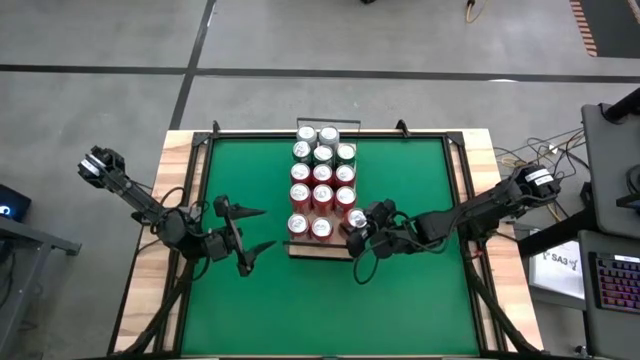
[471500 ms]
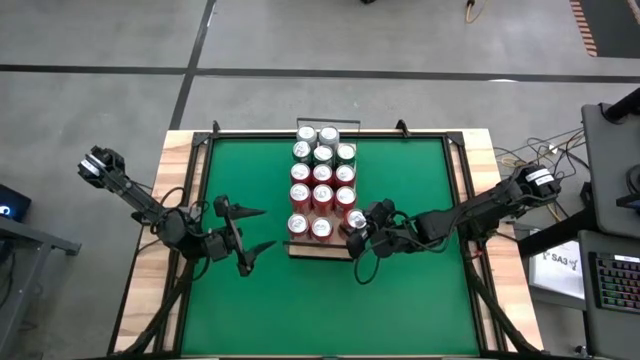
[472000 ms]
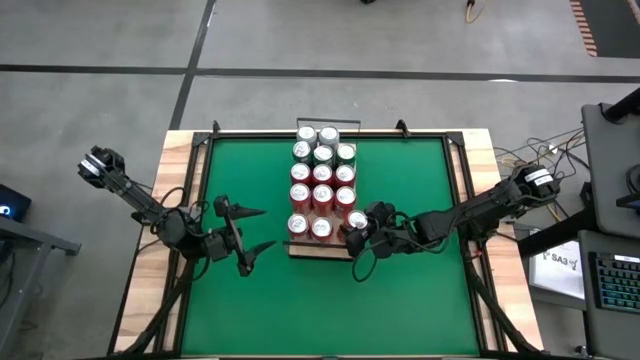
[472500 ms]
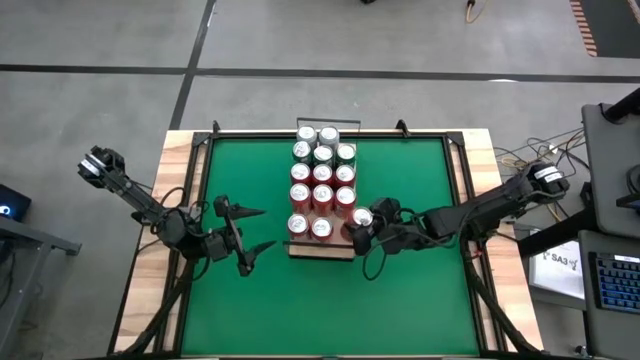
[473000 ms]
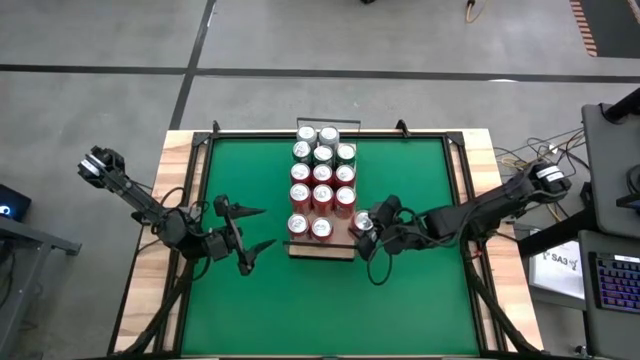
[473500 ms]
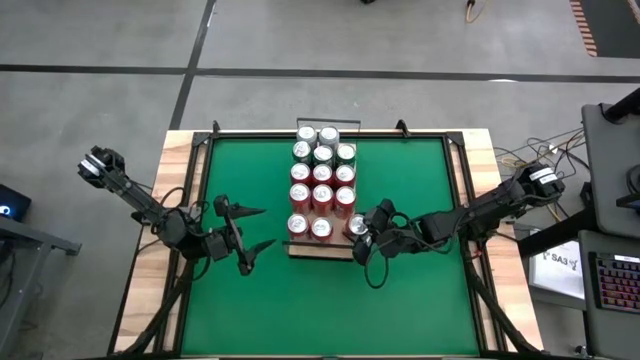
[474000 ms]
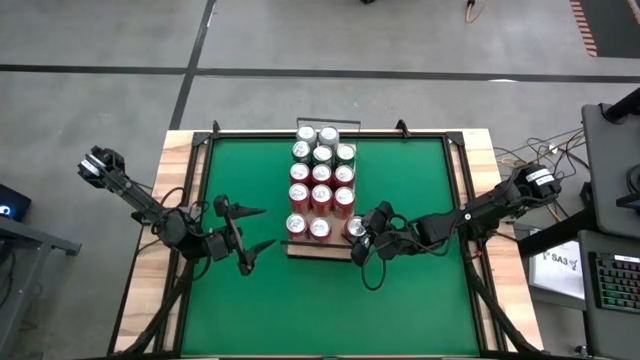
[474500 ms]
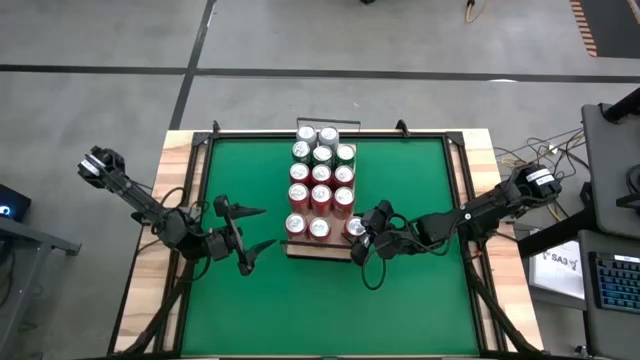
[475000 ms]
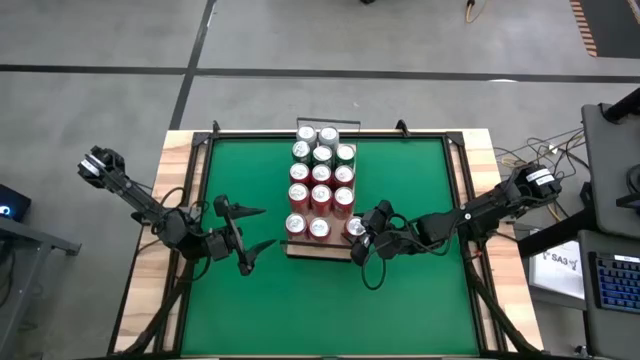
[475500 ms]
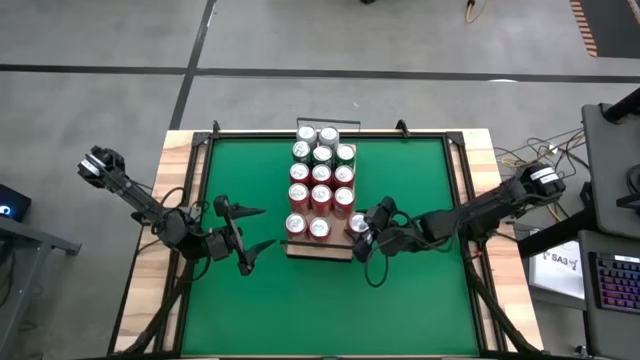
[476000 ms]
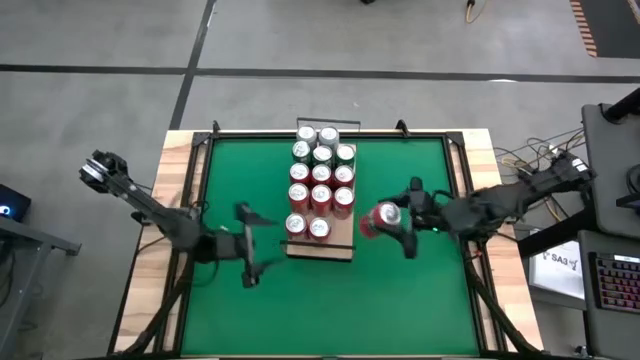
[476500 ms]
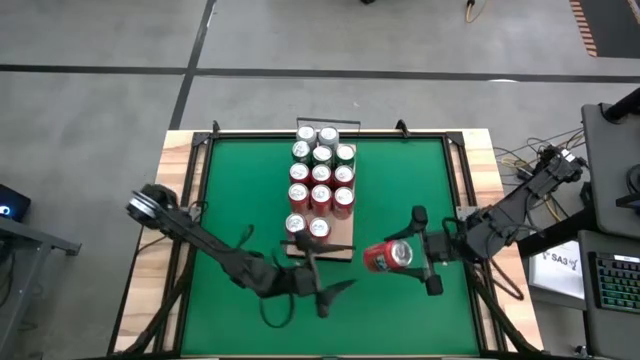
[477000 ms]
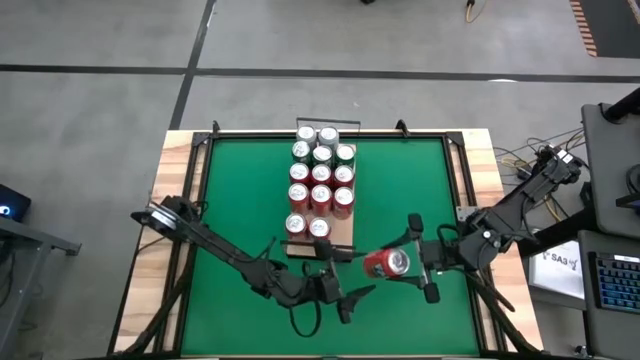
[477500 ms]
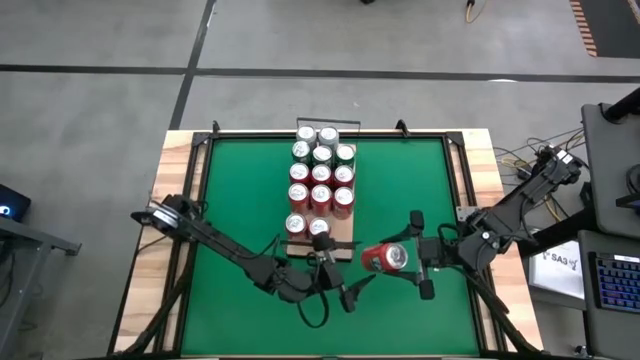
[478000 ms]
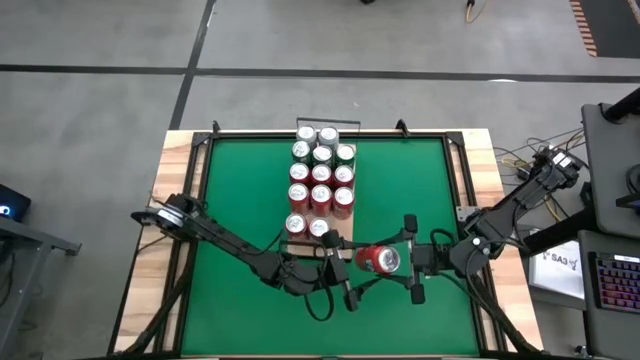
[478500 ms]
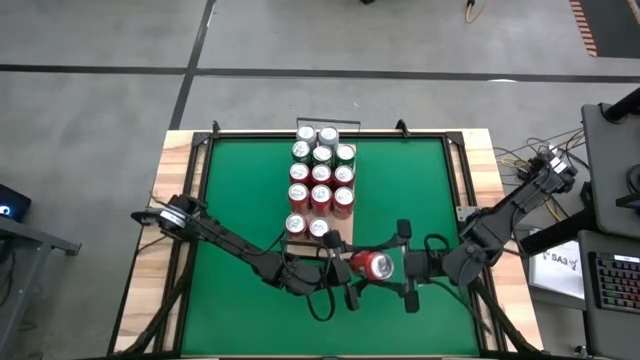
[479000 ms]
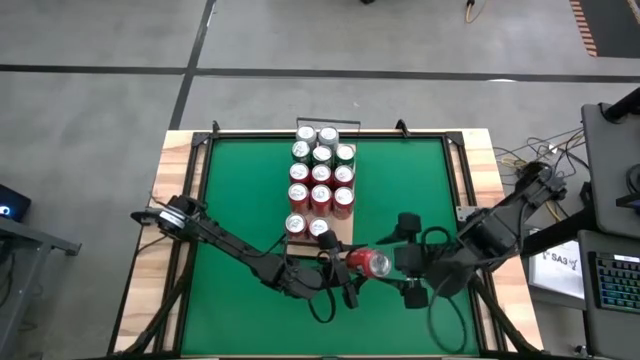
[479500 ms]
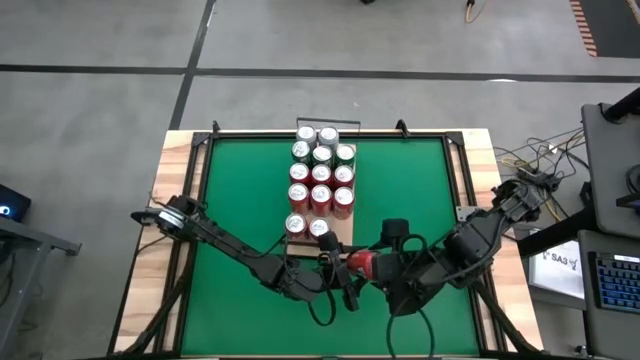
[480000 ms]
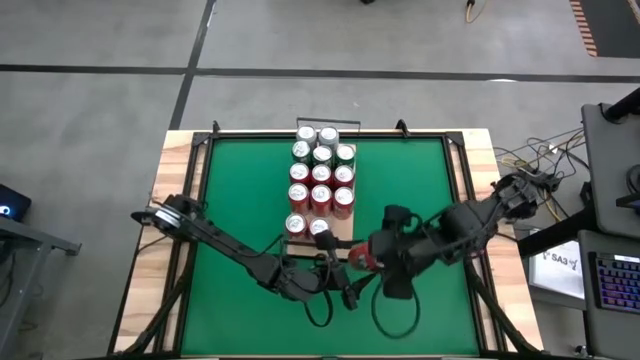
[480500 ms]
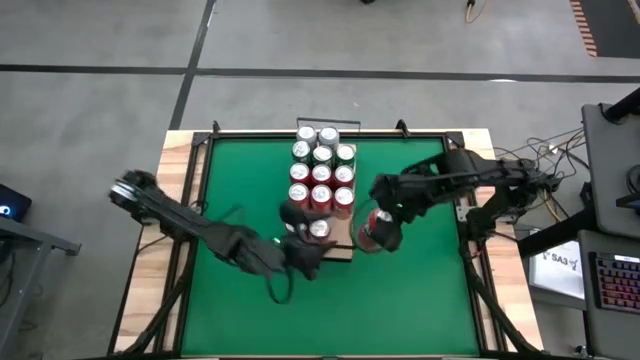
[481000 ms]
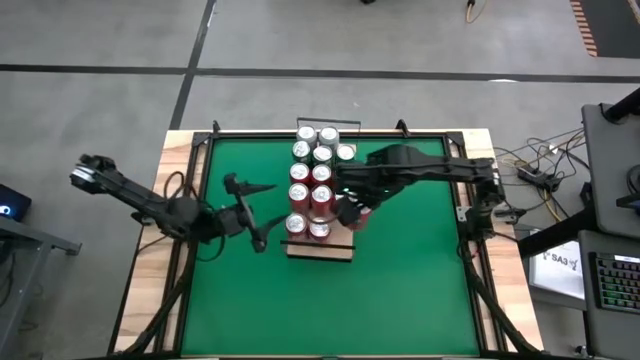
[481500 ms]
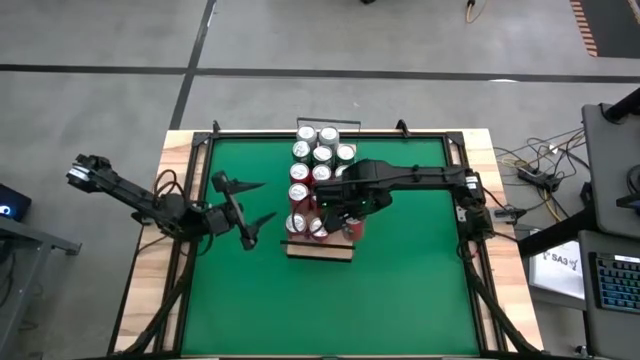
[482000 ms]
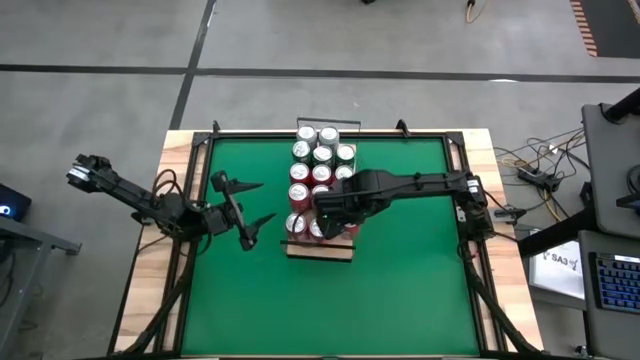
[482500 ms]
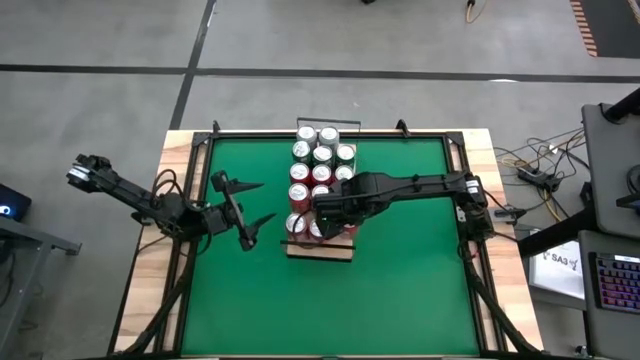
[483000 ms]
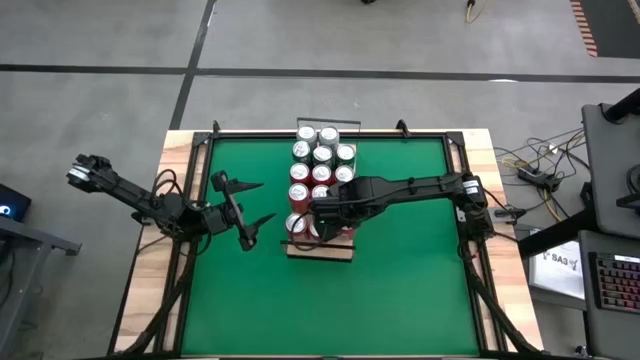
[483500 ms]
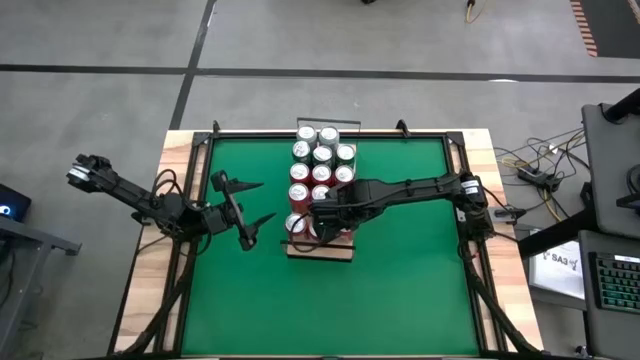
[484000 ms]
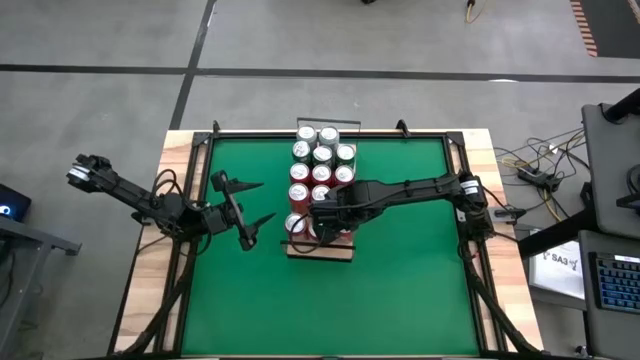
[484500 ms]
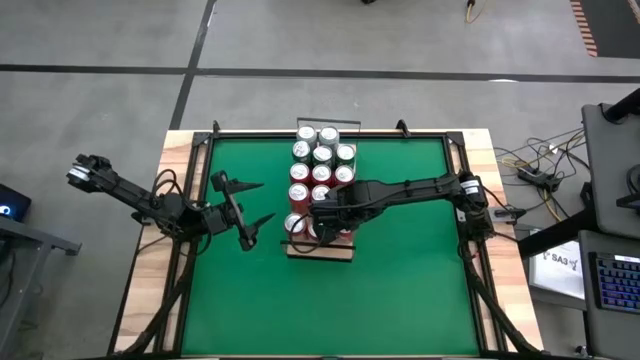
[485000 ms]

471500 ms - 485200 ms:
Task: Place canned beverage on shelf
Put the orange soda can on the shelf and aligned with the other orange soda can

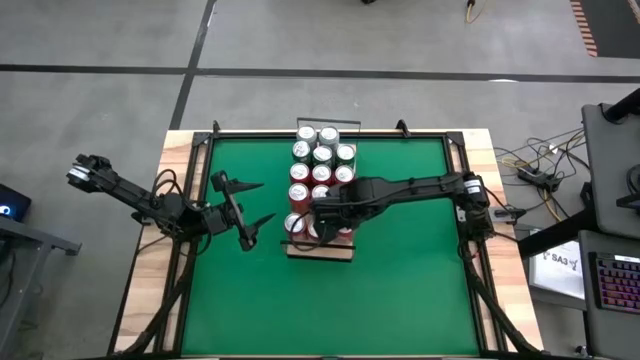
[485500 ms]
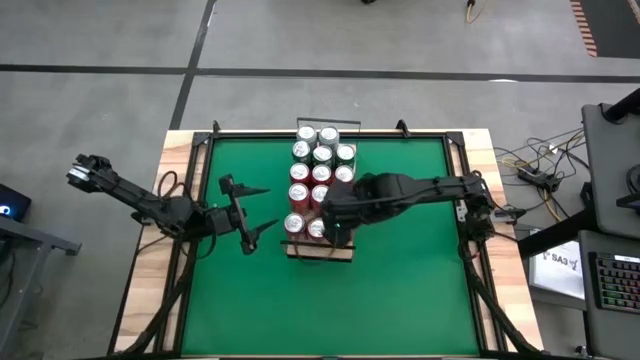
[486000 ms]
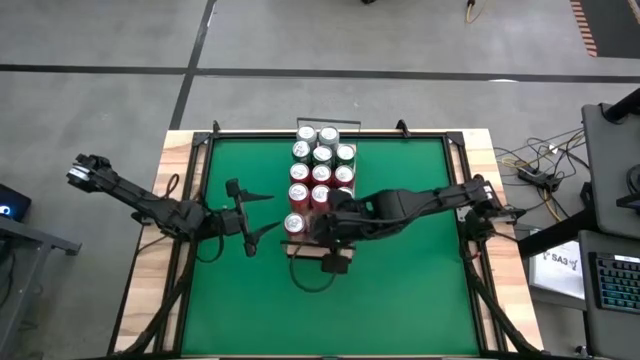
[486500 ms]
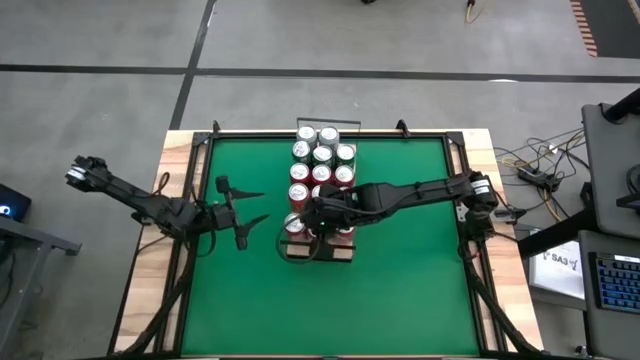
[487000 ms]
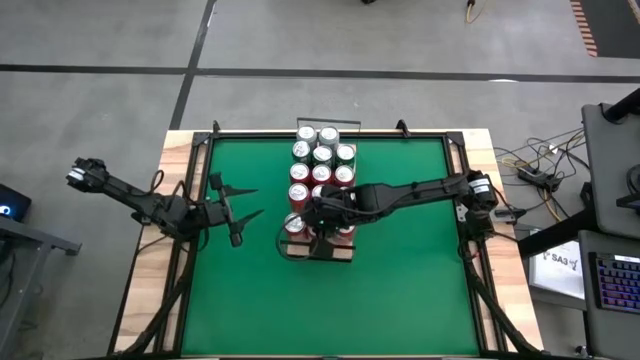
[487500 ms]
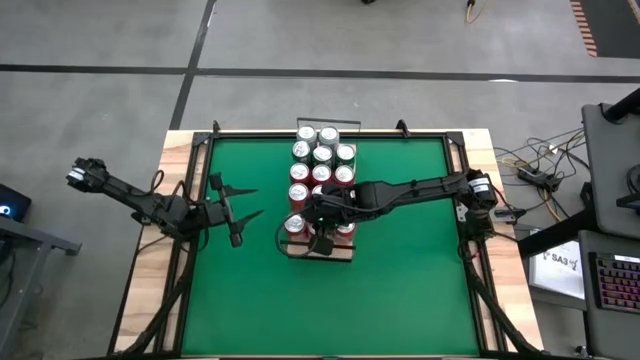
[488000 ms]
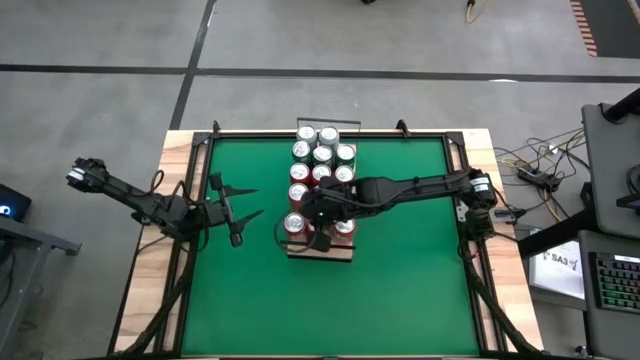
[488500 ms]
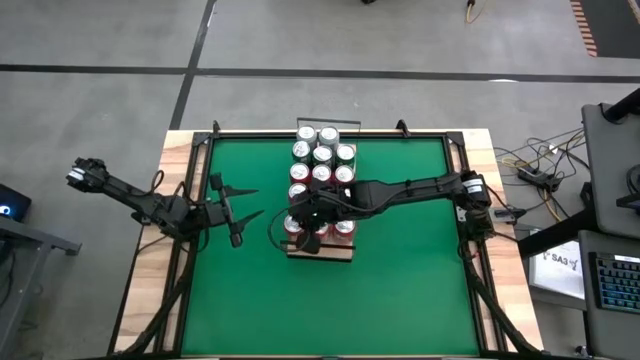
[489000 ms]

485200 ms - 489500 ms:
Adjust the orange soda cans

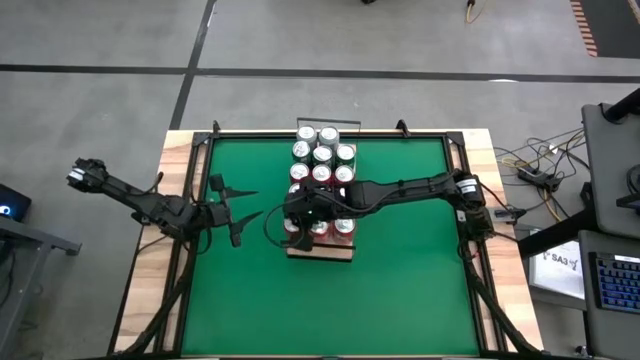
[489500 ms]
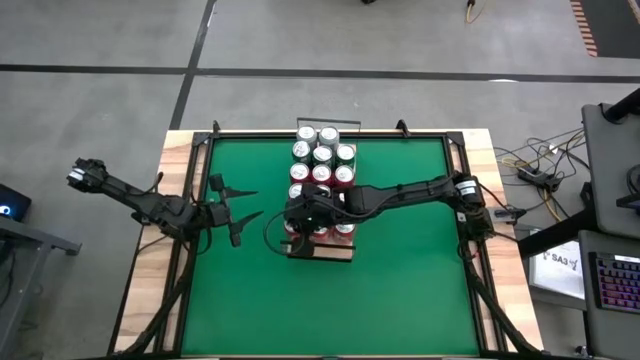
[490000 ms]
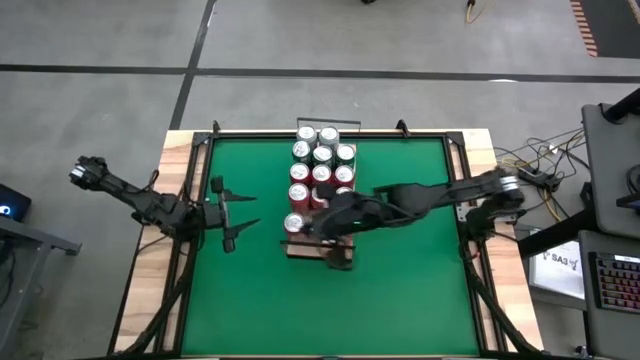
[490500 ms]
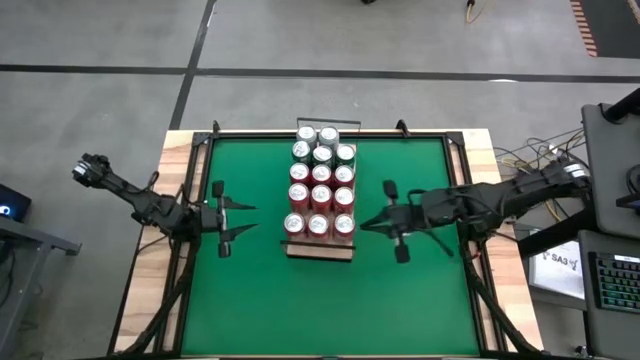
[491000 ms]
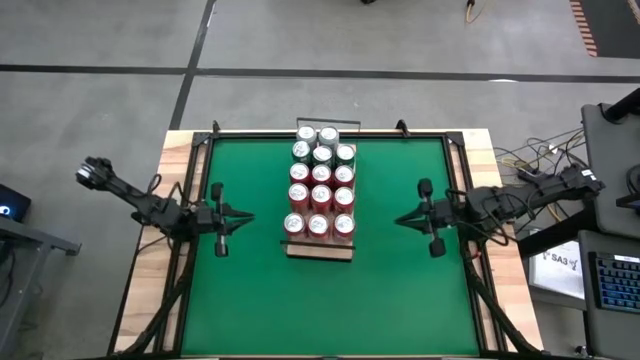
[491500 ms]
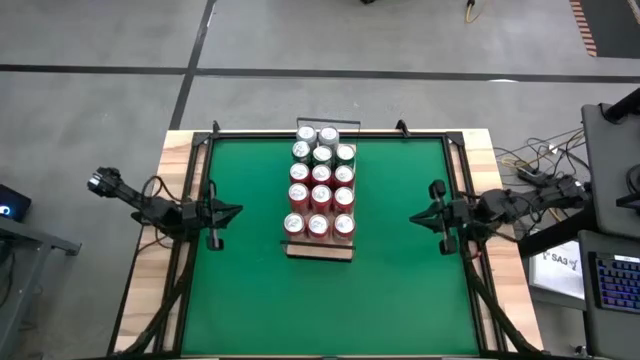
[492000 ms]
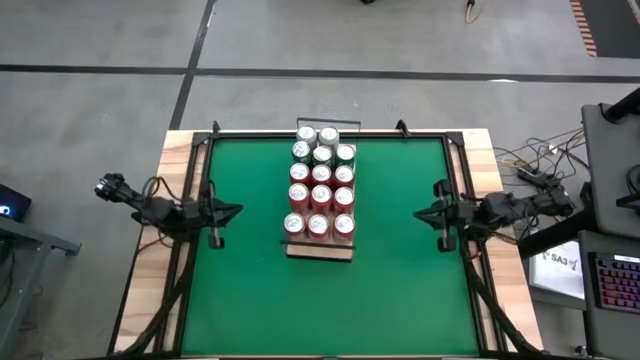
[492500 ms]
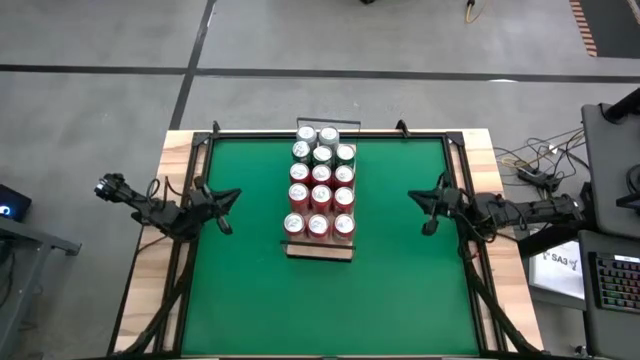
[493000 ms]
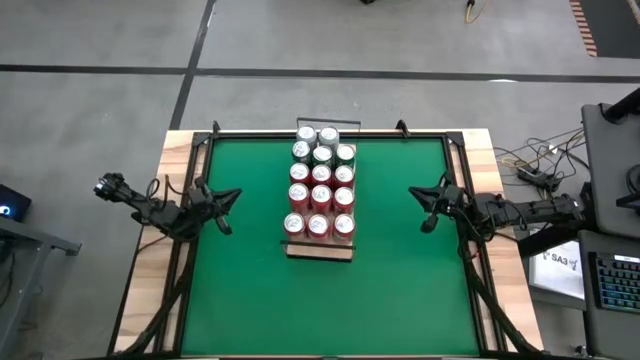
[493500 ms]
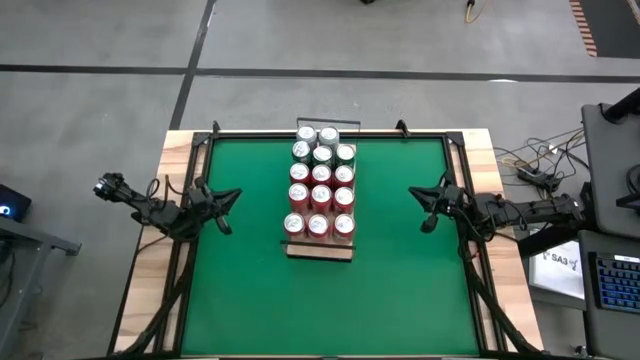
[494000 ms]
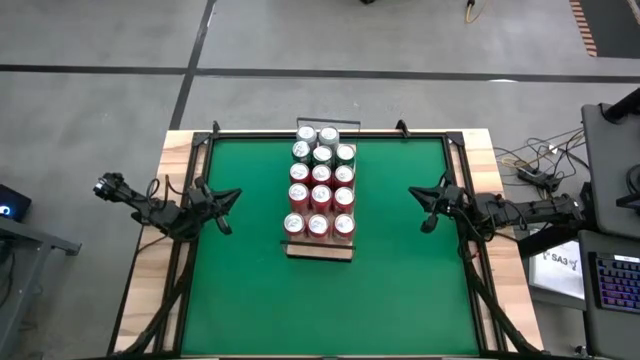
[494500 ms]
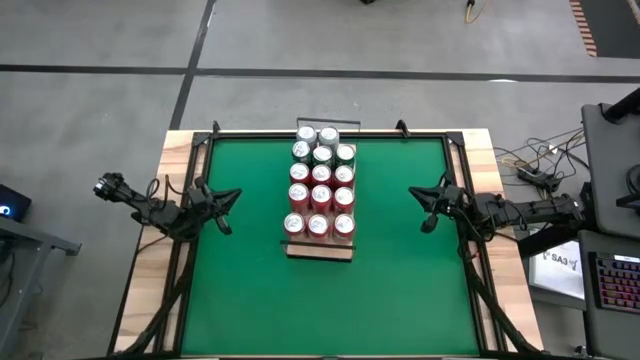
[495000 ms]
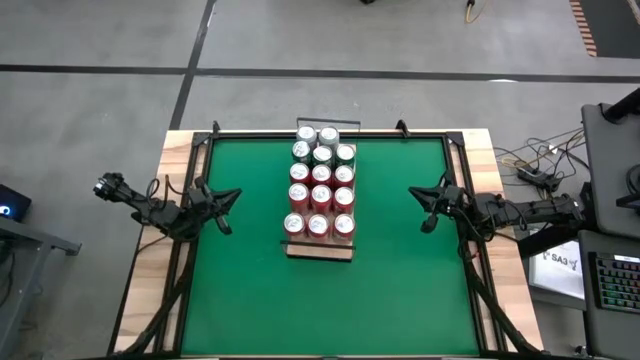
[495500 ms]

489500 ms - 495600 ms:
Return to Home Position
